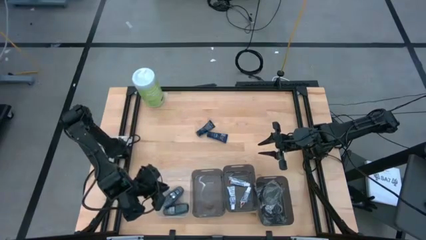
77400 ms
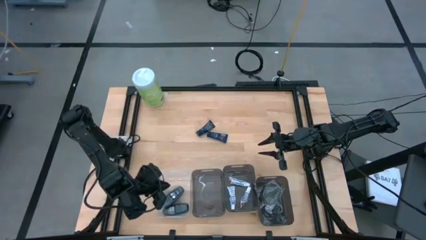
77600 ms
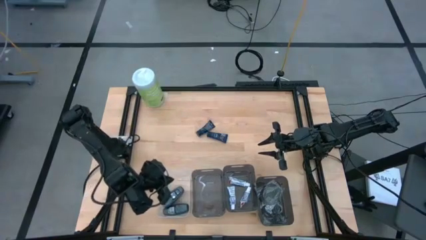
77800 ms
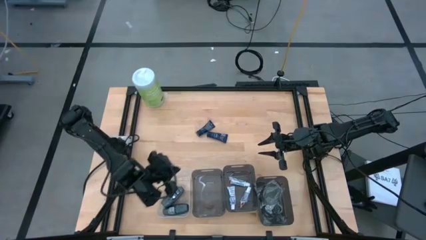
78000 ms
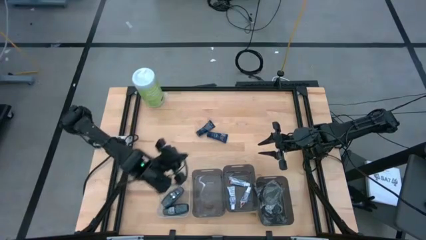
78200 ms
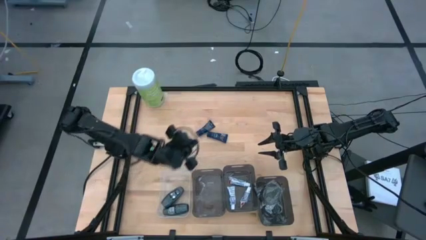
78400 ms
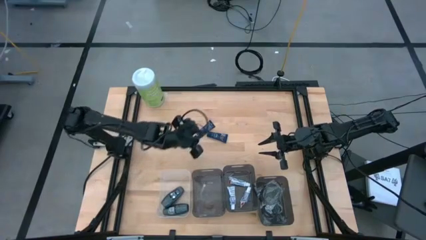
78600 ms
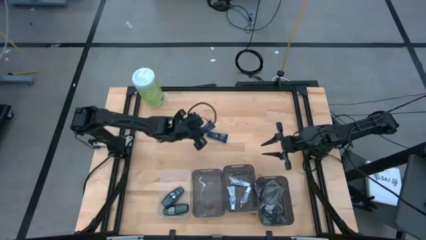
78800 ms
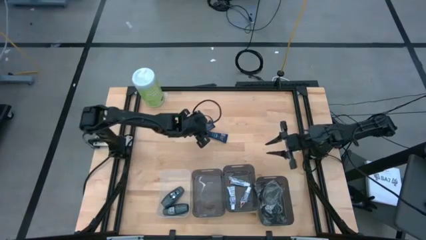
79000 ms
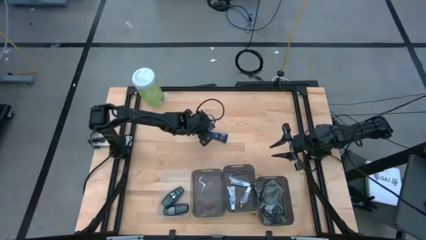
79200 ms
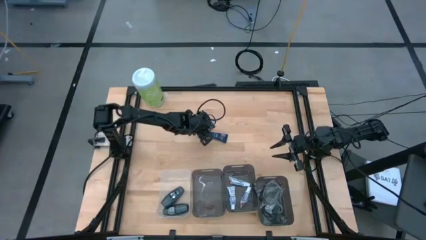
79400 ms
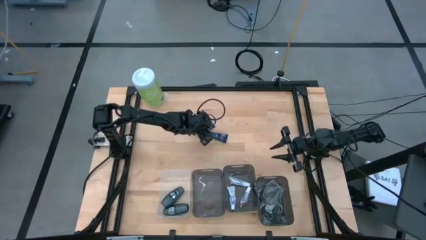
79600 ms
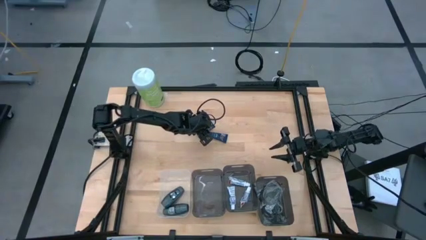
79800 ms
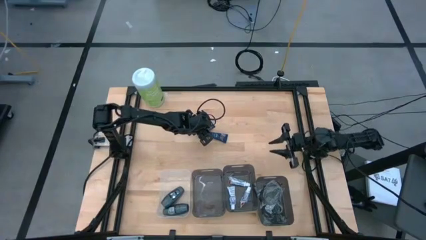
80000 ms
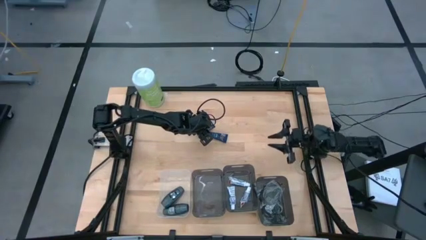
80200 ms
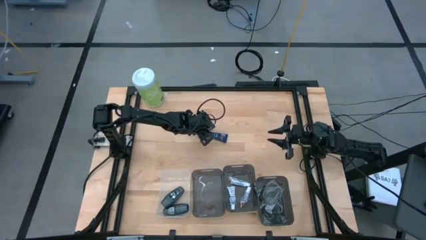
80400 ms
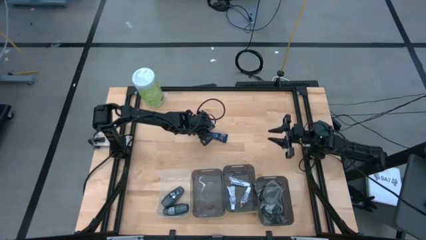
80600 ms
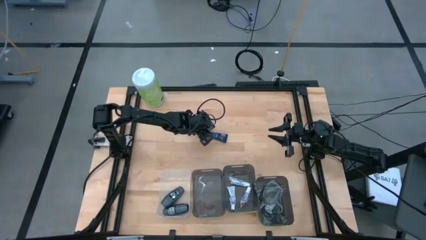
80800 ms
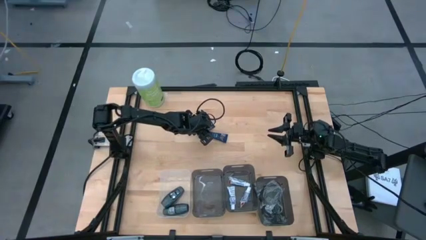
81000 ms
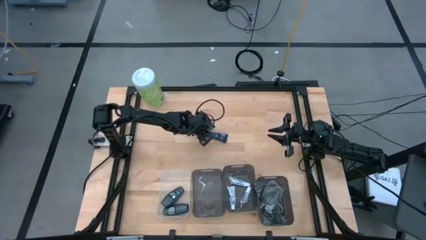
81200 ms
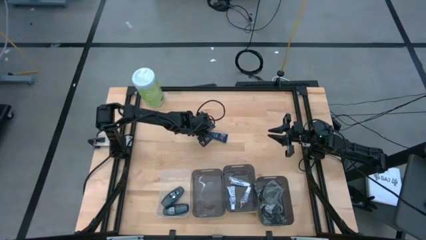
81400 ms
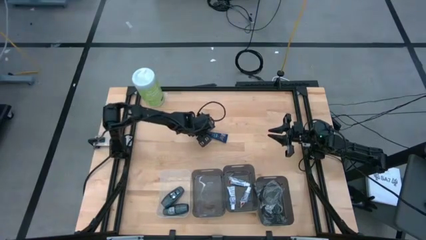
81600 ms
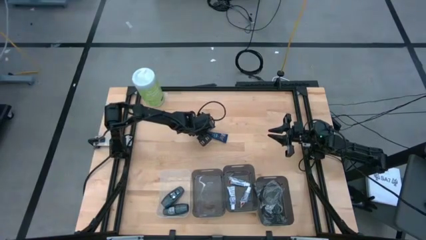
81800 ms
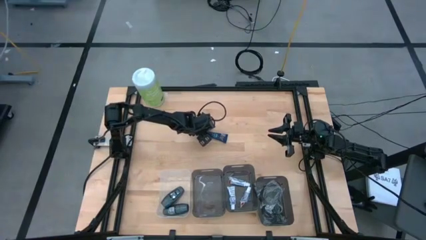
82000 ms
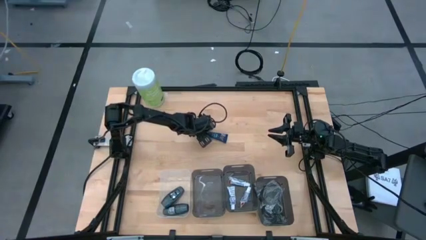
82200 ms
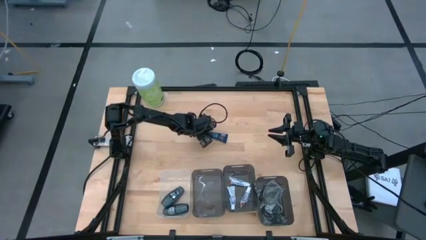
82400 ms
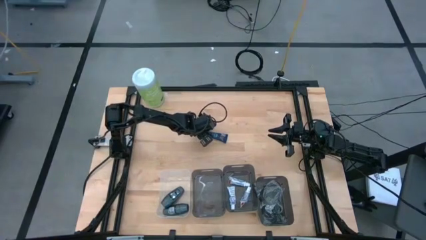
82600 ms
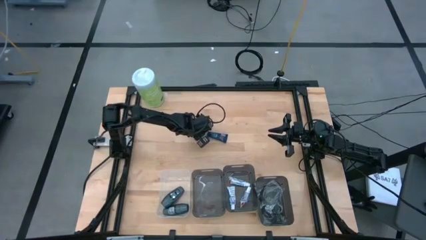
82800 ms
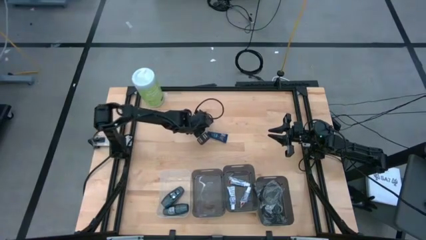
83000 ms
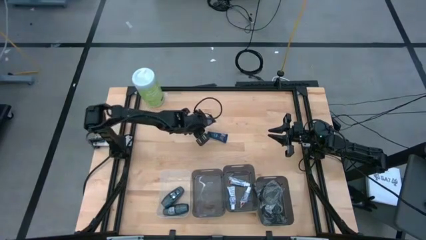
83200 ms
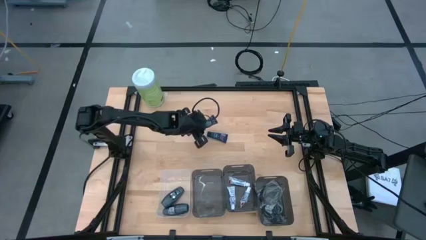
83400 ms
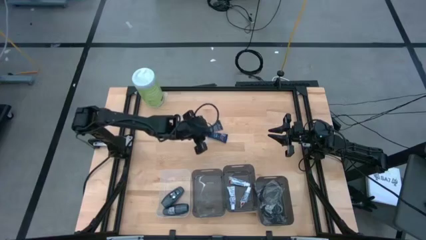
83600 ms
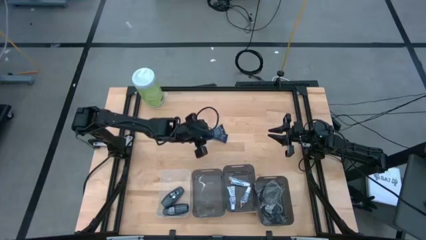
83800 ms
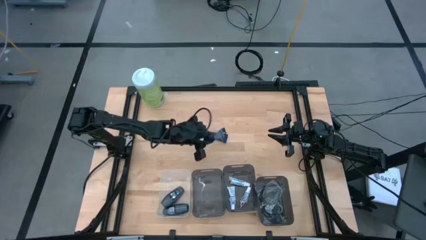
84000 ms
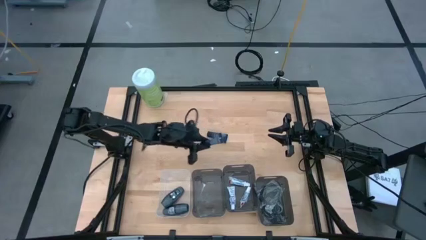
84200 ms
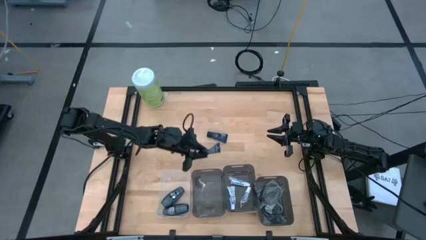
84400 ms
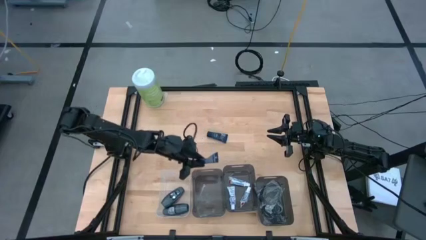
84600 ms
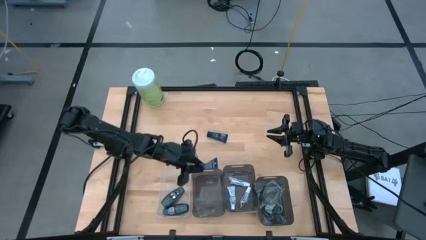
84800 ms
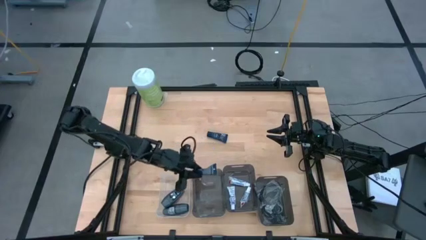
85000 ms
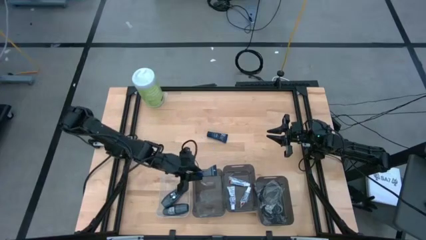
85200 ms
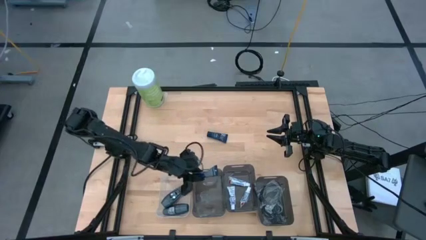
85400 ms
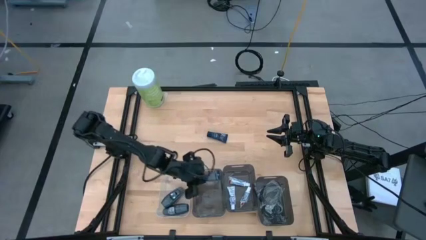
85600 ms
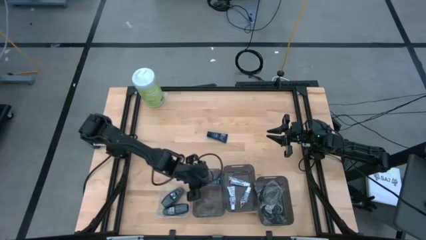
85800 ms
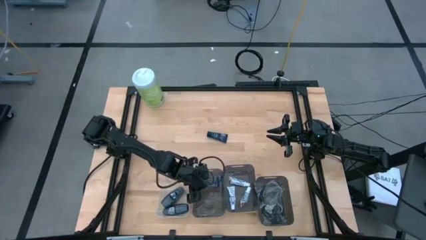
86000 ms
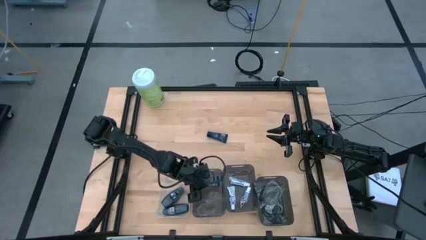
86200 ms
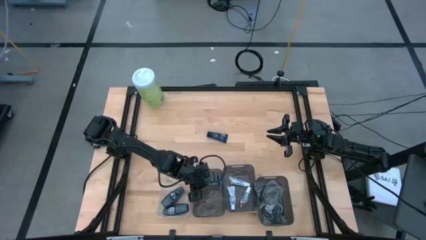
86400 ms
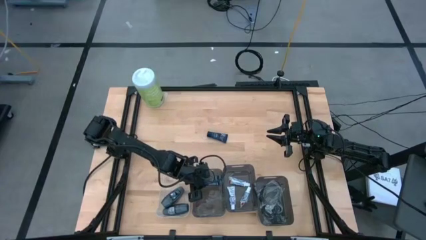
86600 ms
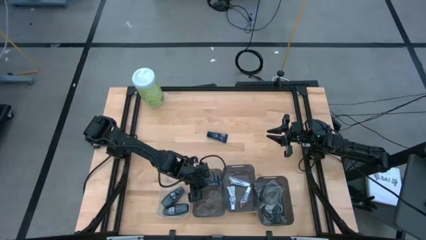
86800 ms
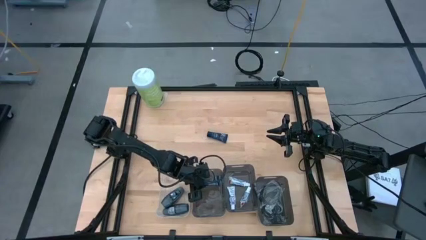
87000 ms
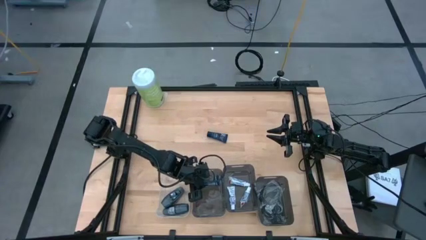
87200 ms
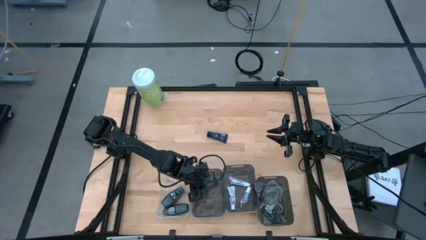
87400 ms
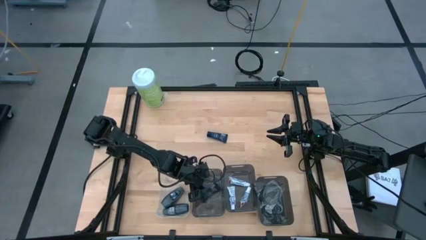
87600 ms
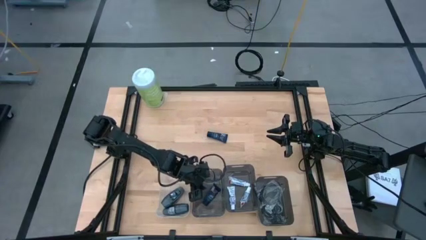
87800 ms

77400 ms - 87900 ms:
Task: Pick & Place Travel size toiletries
Put the top blue shaving cream into the left black bin

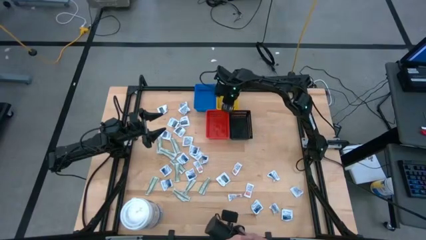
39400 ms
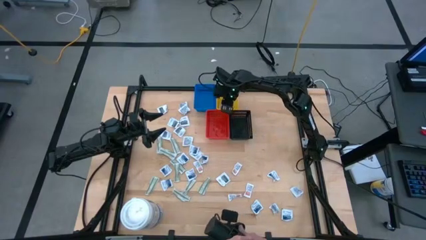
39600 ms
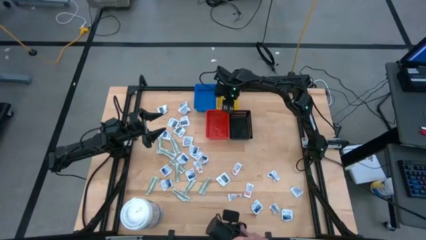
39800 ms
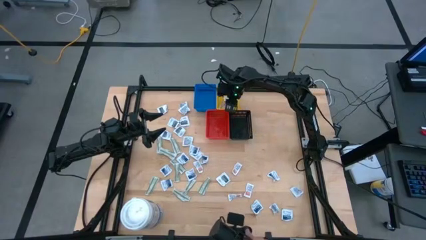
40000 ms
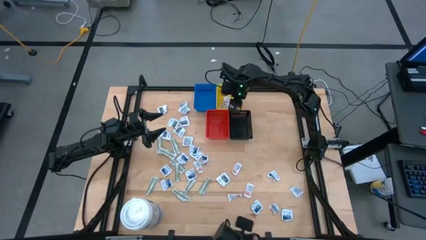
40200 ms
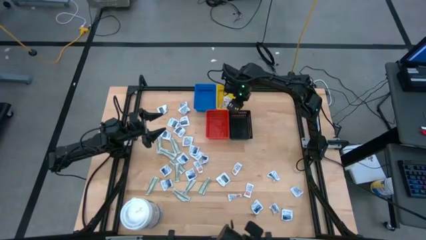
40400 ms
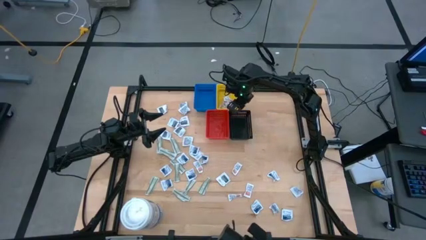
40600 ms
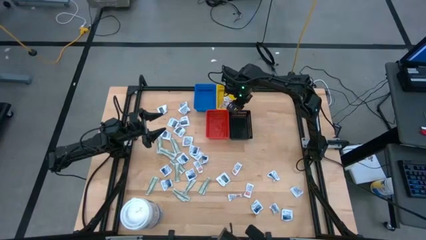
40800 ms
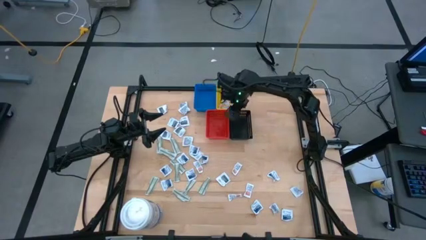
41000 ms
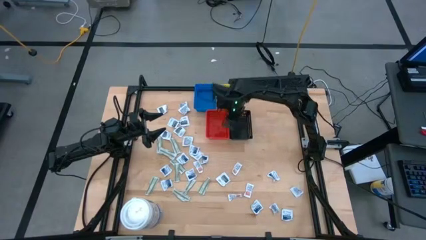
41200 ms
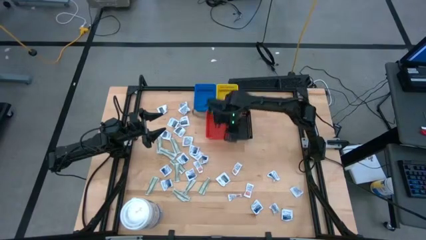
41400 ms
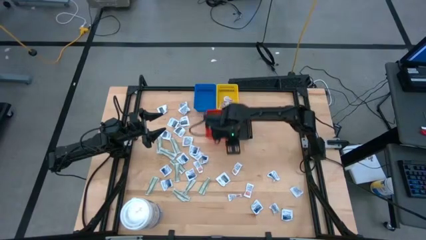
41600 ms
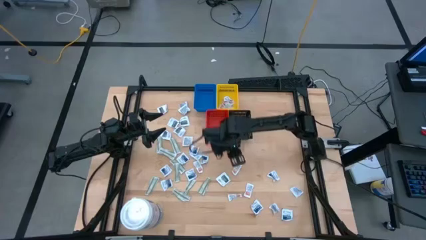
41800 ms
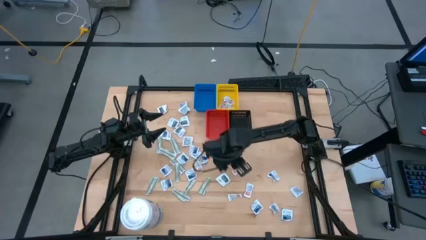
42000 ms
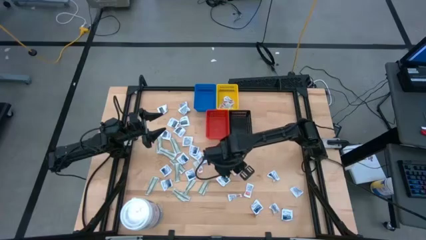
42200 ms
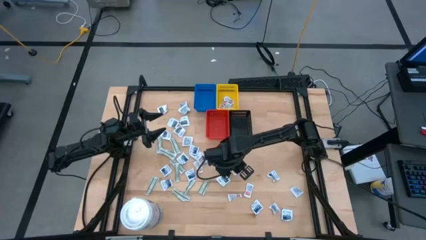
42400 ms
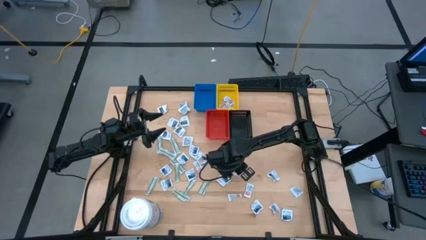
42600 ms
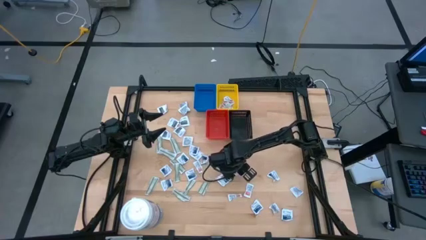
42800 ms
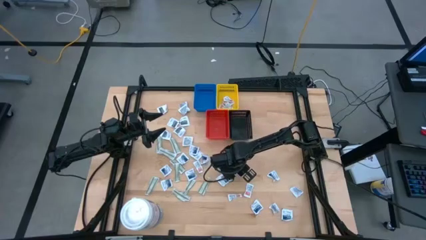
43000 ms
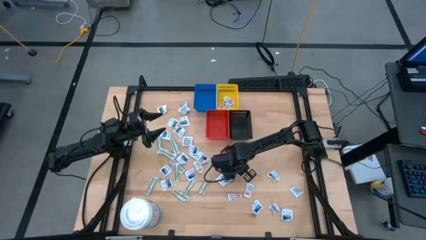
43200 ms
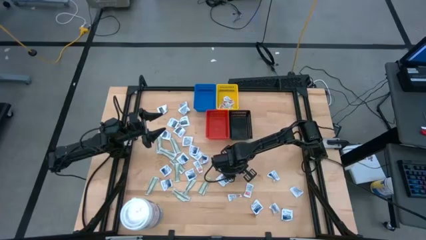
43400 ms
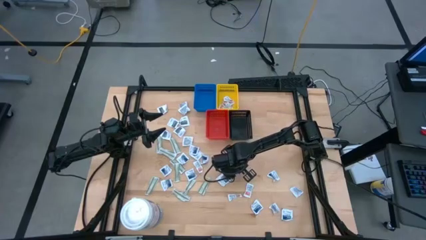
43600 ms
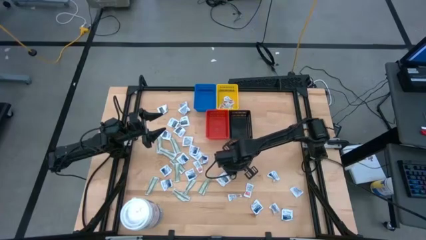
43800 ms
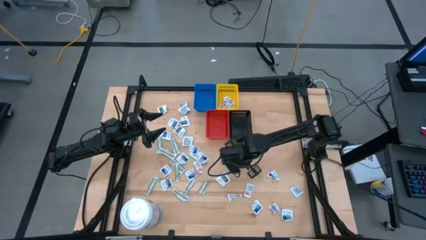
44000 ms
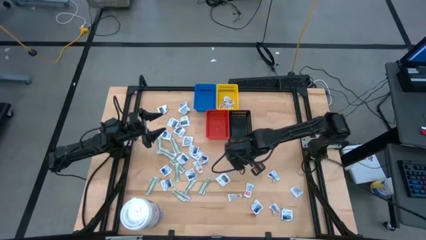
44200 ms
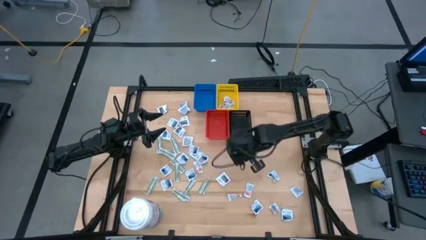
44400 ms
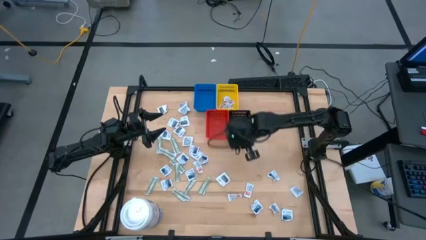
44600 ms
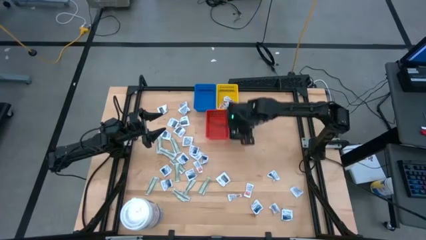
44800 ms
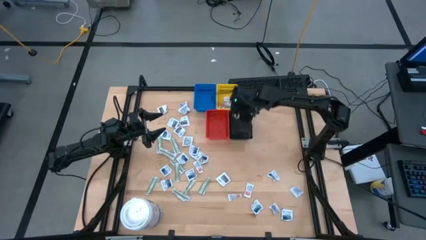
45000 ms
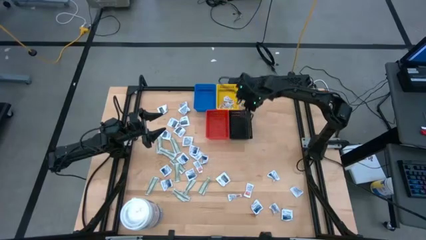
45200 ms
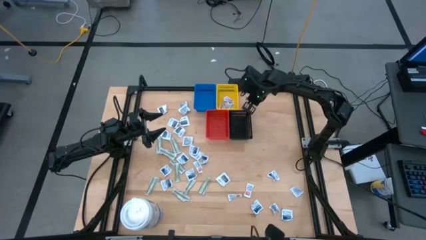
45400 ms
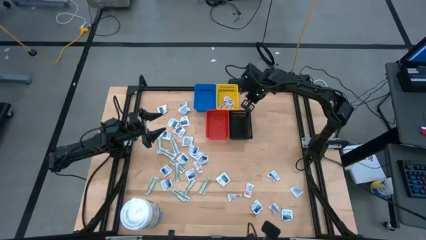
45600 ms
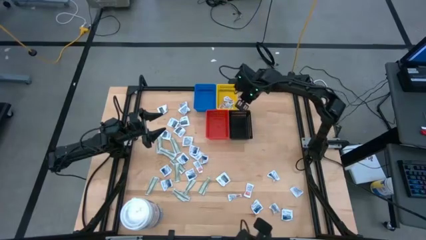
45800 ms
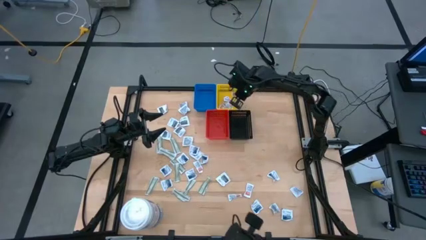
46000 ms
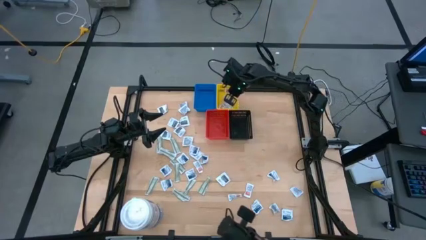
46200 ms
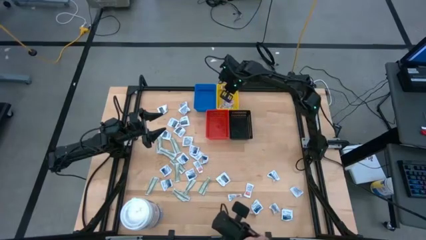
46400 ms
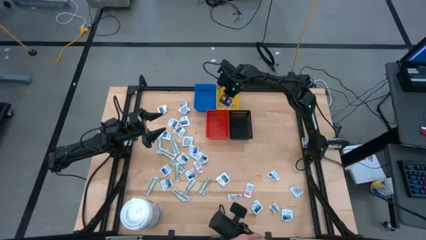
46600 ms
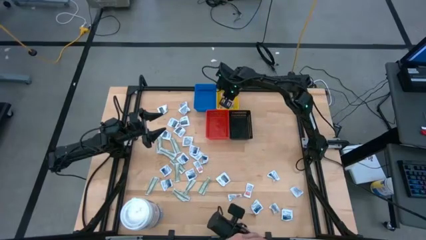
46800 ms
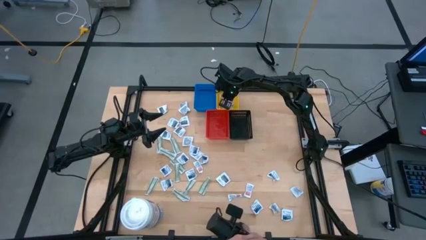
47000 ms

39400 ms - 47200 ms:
Task: Pick & Place First Aid Supplies
Put the ointment pack into the yellow bin
